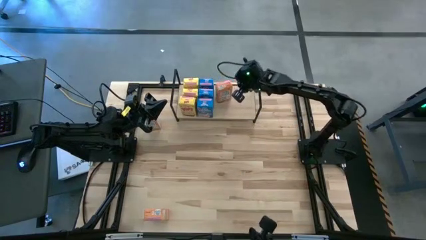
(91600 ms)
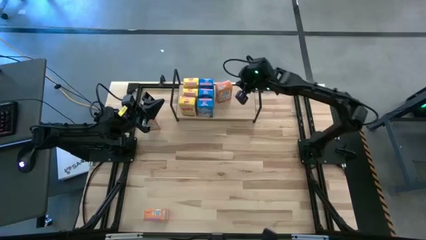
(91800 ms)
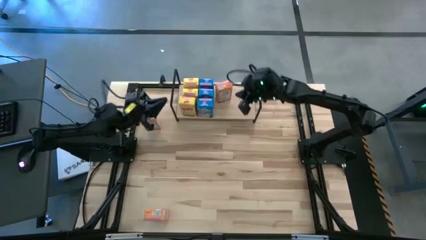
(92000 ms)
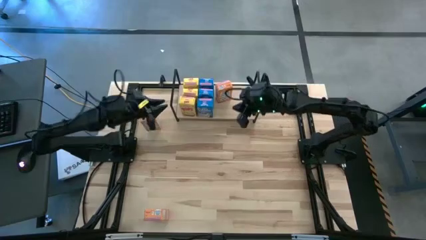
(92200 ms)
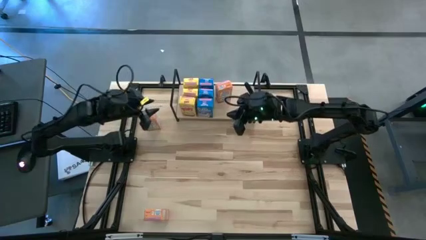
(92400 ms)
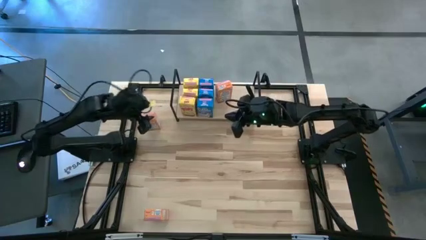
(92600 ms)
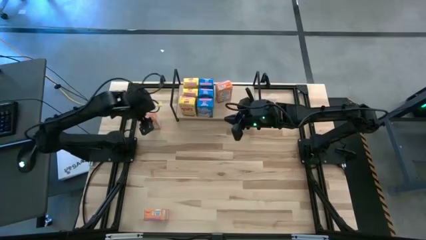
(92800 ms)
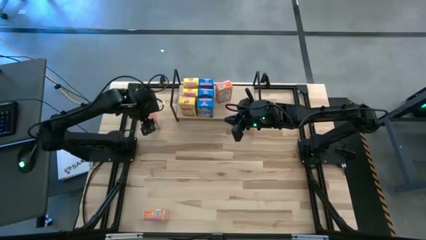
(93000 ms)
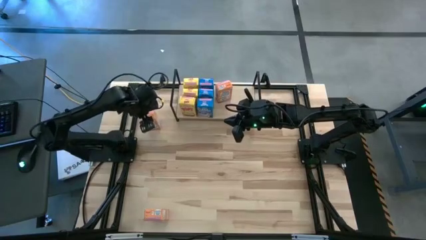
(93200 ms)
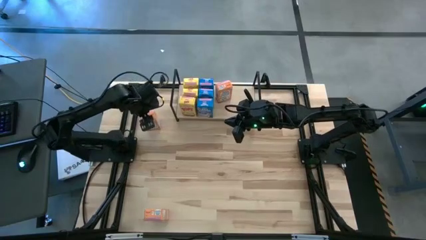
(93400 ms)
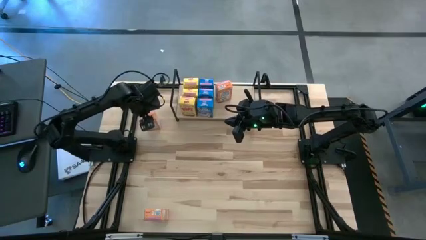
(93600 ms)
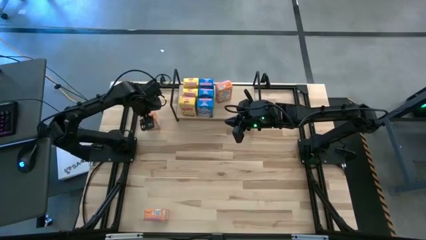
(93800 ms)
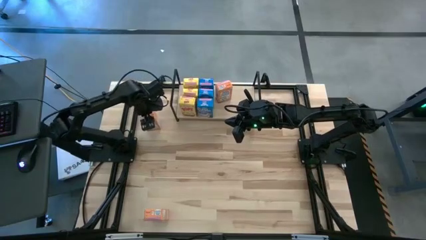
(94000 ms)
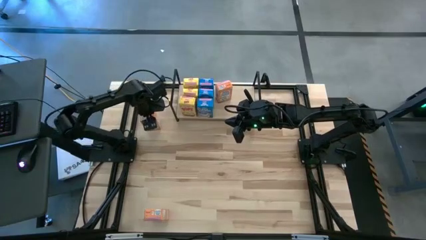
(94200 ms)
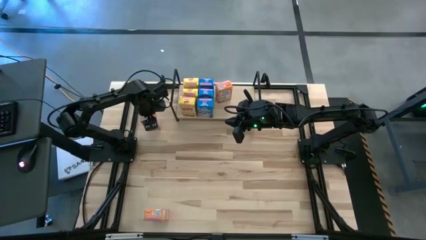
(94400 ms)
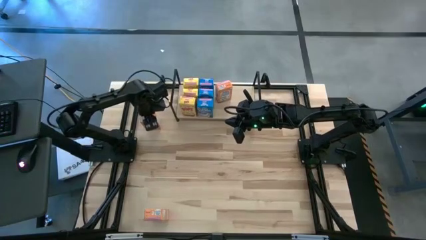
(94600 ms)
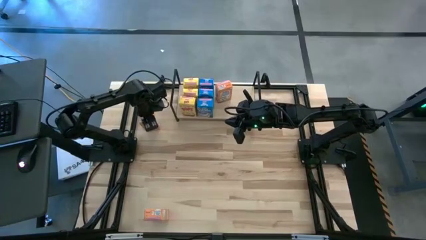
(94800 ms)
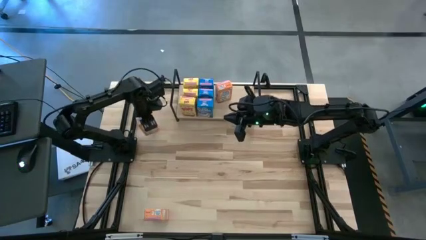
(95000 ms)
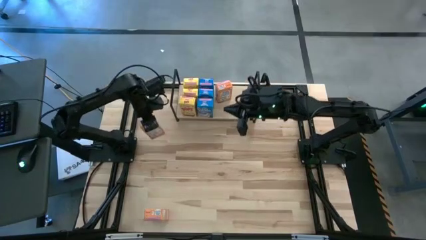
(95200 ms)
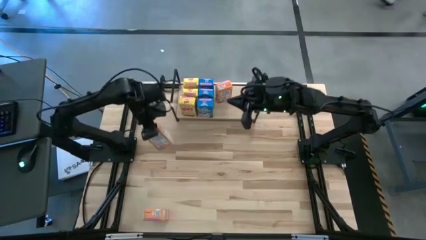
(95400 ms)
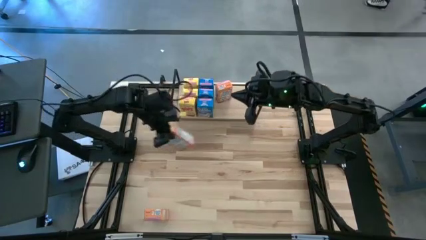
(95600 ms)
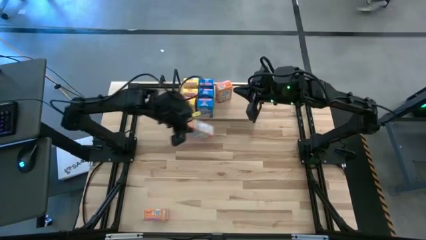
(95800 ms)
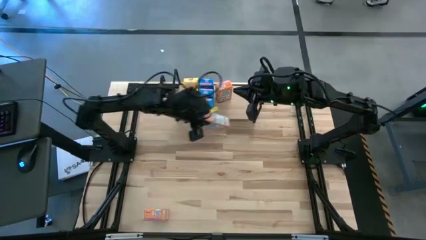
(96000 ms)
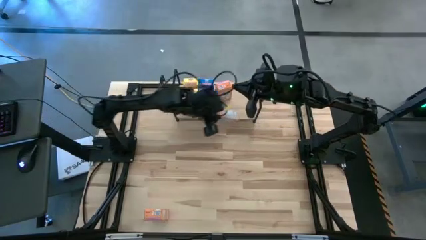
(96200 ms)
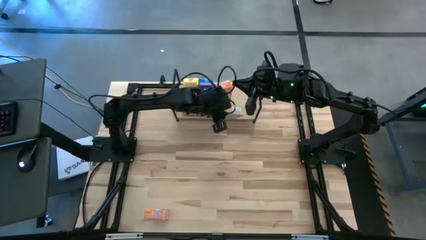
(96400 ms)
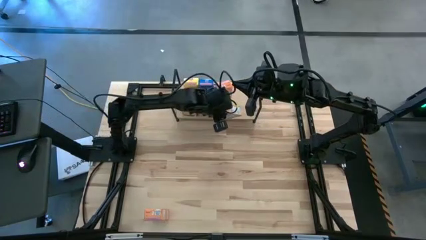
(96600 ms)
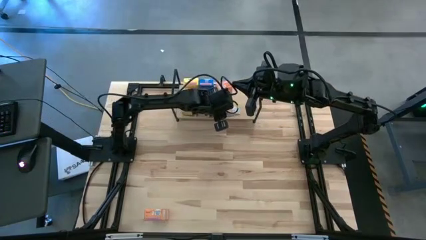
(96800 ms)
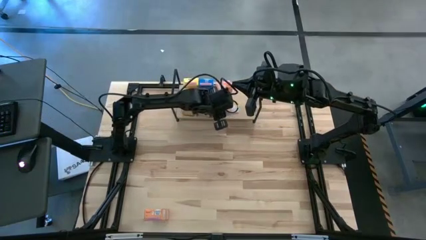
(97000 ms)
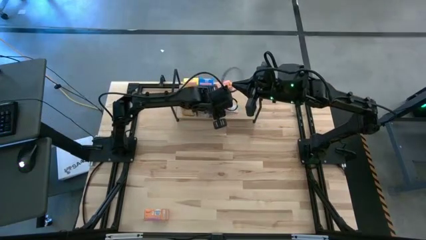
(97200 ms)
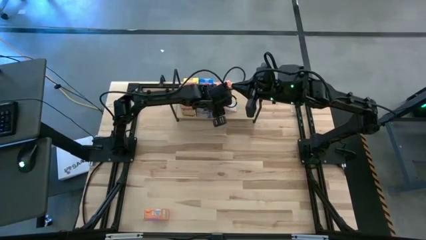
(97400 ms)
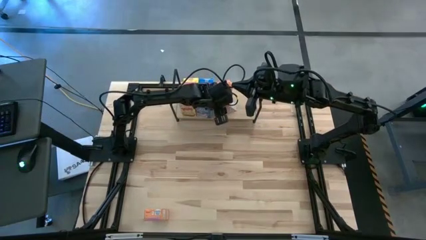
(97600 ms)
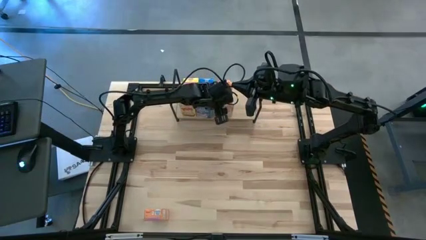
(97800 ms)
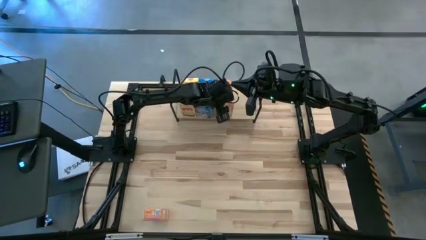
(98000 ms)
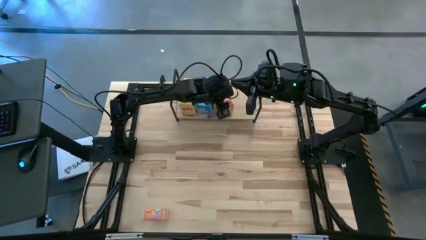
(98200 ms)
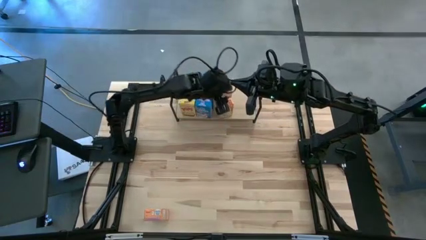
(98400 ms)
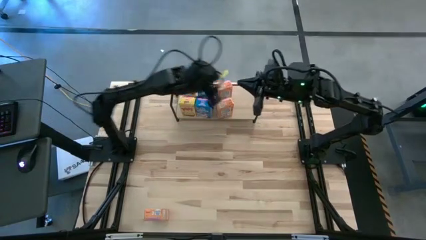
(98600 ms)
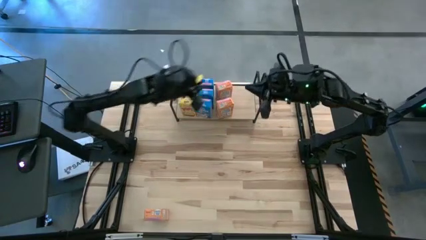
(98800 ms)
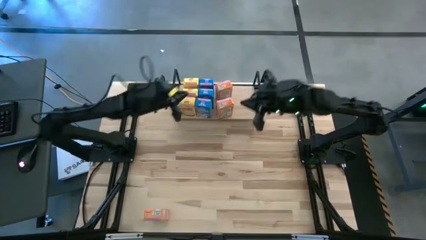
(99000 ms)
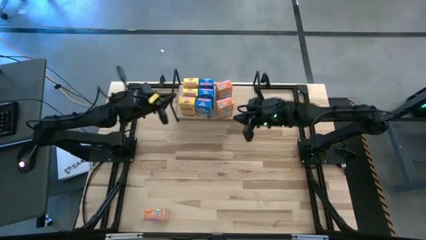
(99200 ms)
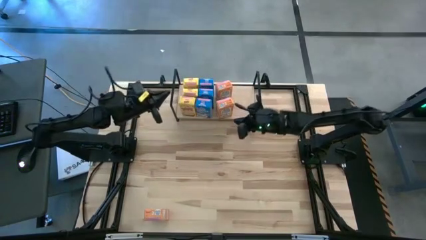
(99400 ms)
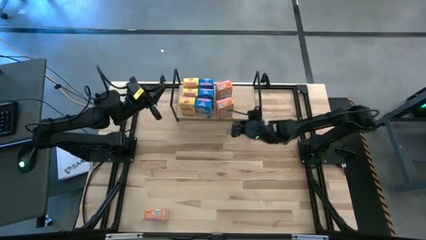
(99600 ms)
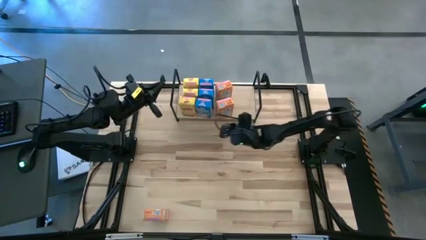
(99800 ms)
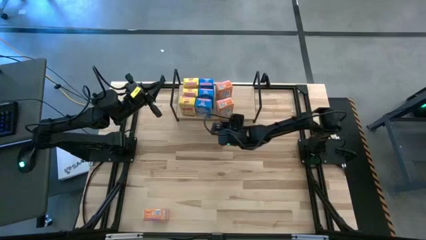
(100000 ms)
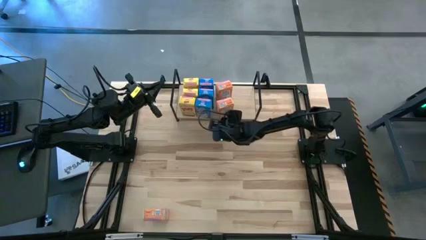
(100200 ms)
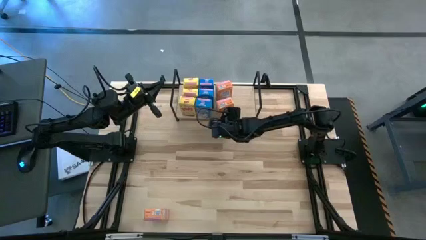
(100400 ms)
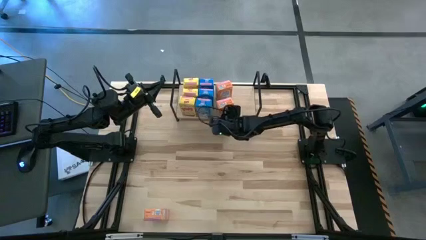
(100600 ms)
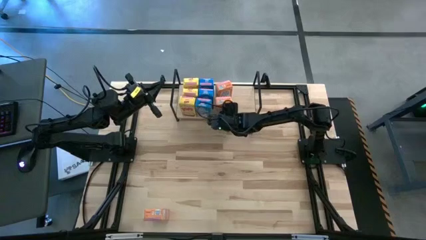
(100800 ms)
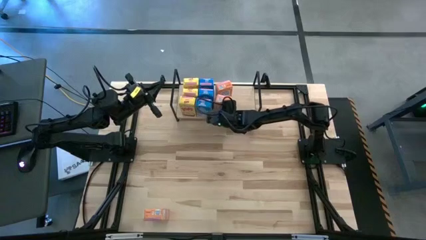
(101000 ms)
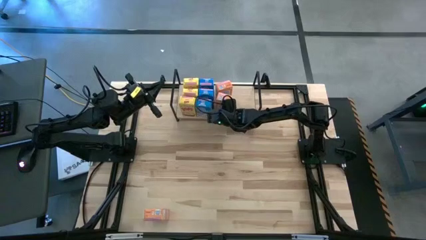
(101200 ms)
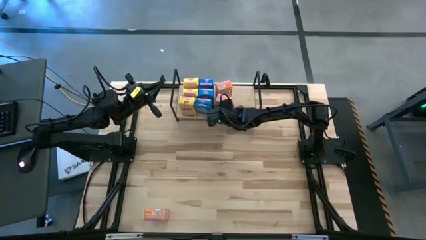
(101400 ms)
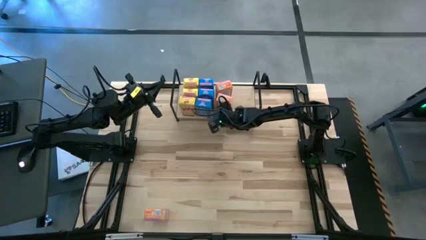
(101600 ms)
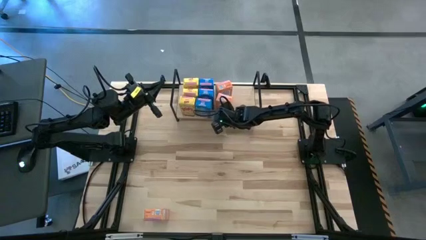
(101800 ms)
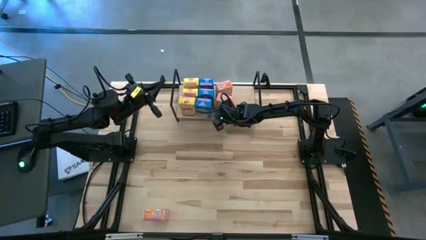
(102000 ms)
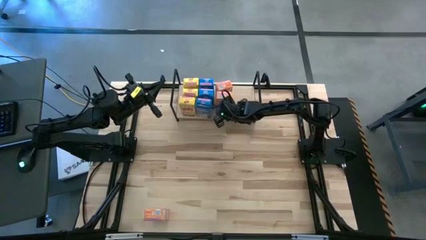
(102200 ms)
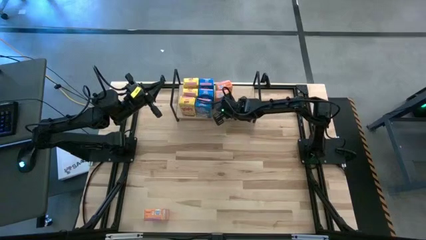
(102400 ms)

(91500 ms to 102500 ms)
Task: Stack cereal on shelf
Put the top orange cereal box on the shelf aligned with the other orange cereal box

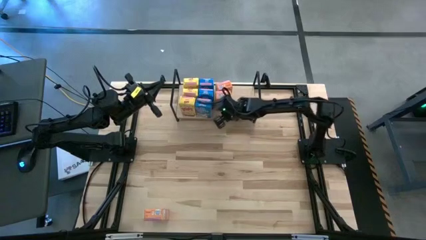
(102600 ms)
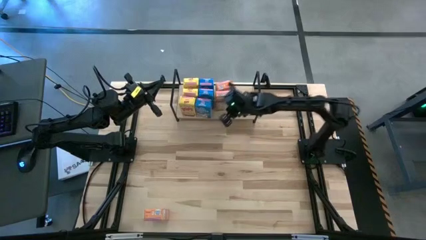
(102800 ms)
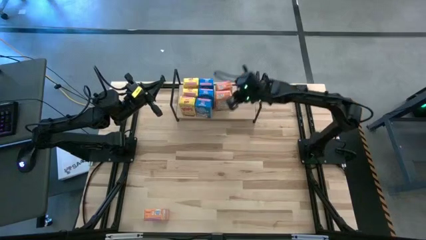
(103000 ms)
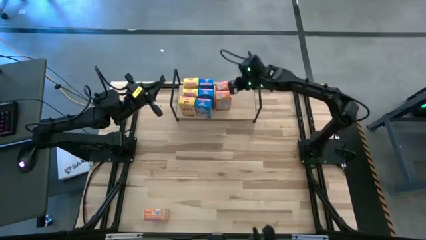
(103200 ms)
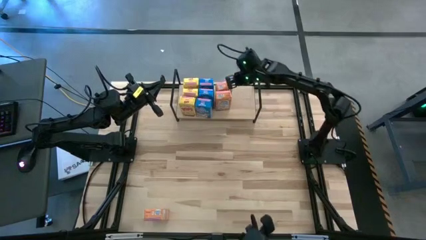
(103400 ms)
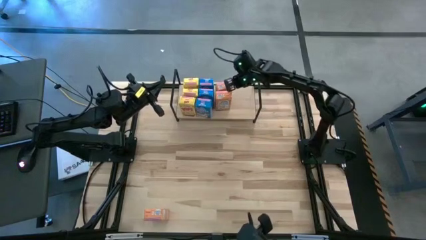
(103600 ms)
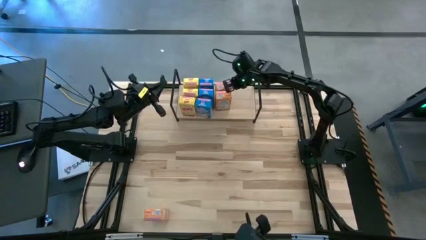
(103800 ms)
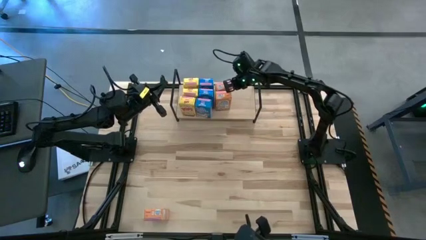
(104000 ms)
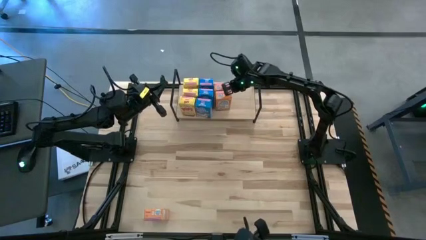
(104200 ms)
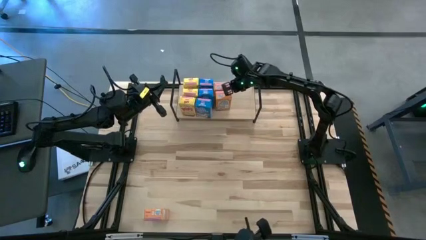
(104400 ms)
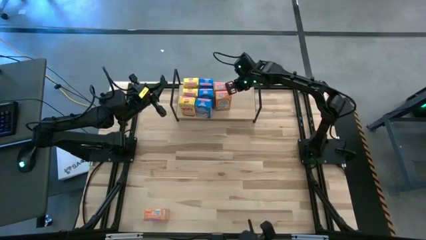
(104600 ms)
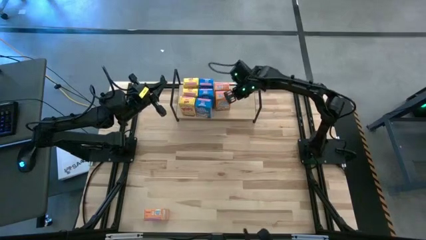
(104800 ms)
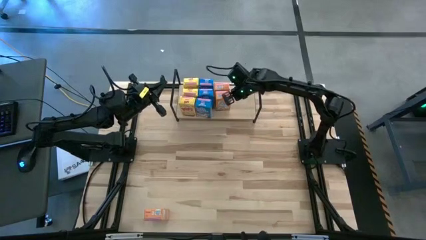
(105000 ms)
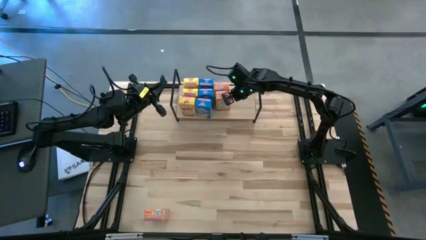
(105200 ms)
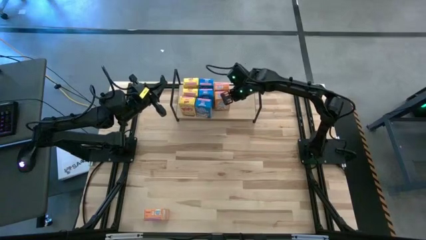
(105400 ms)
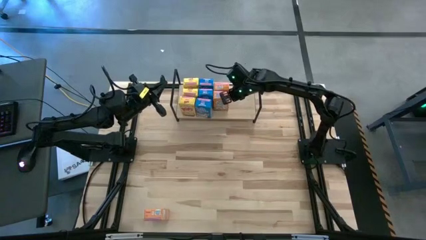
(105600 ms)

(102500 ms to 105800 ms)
Adjust the orange cereal boxes on the shelf
